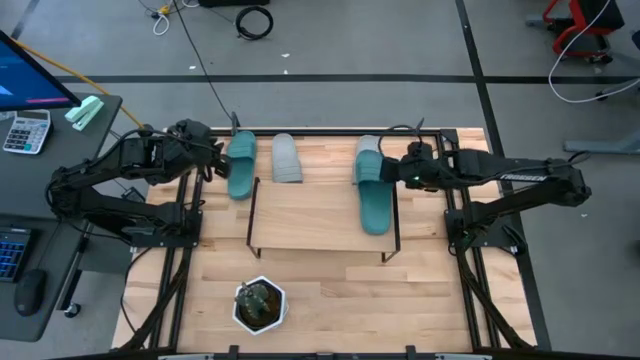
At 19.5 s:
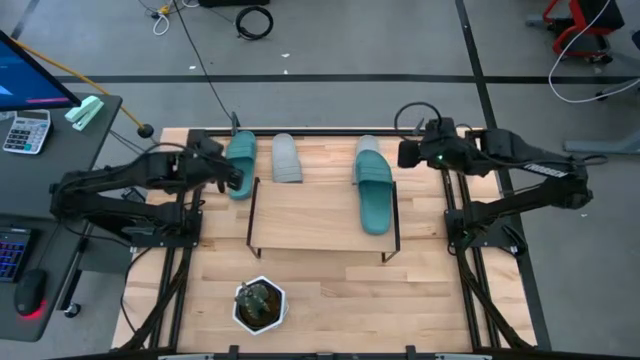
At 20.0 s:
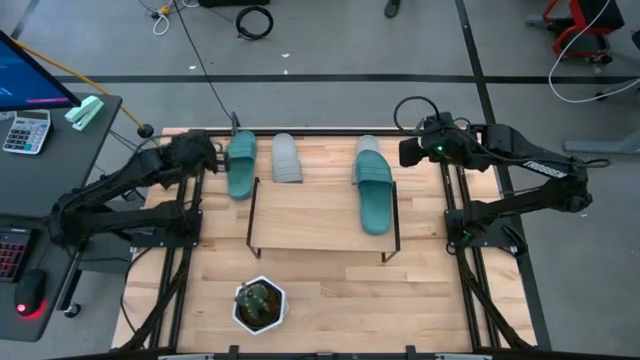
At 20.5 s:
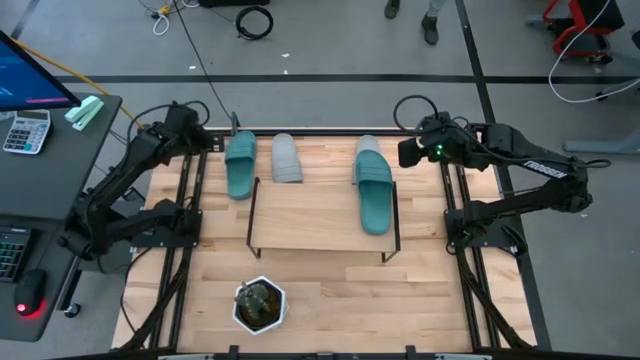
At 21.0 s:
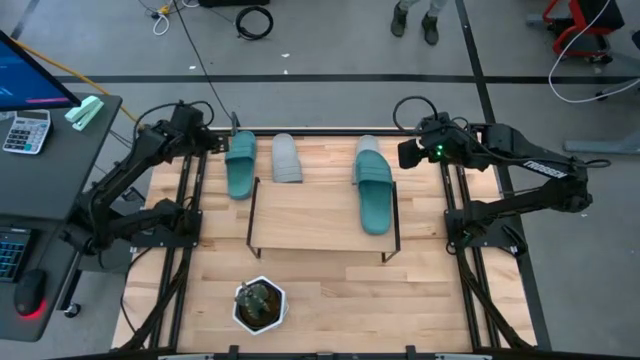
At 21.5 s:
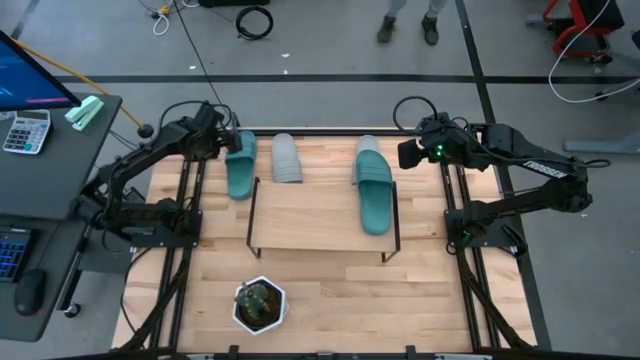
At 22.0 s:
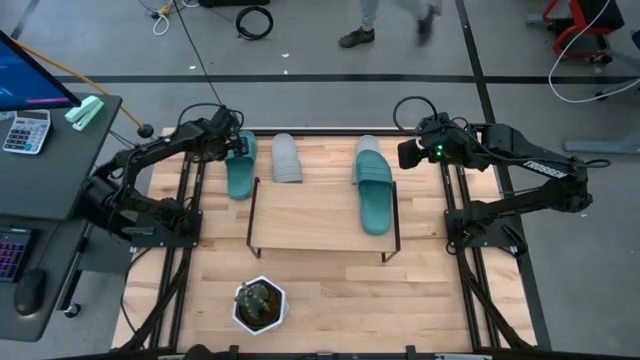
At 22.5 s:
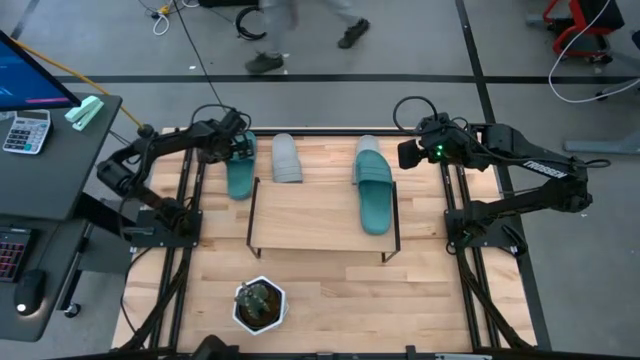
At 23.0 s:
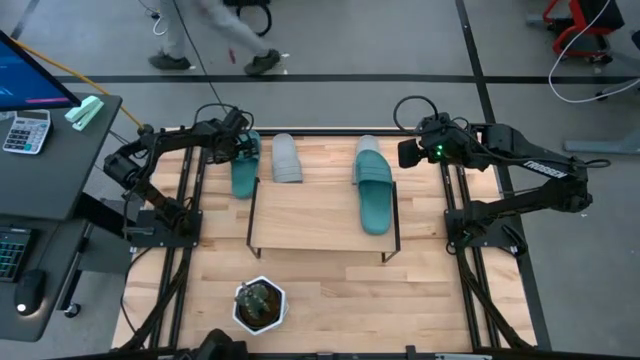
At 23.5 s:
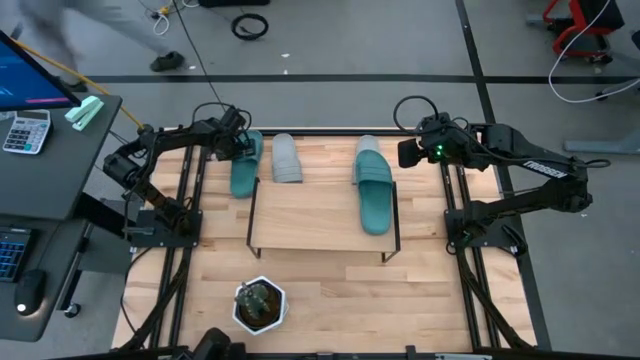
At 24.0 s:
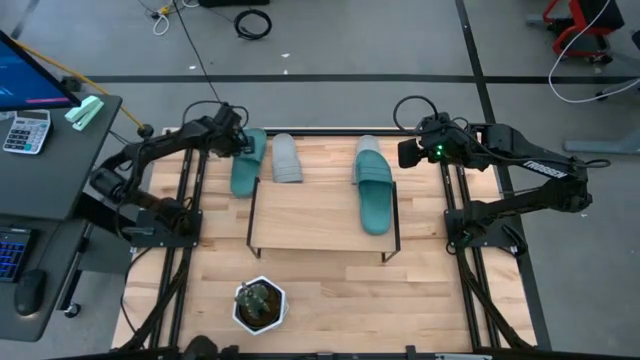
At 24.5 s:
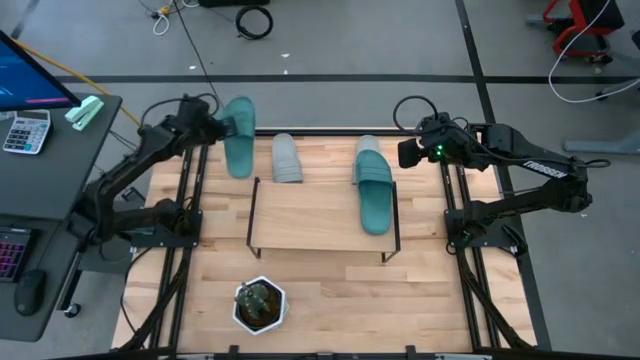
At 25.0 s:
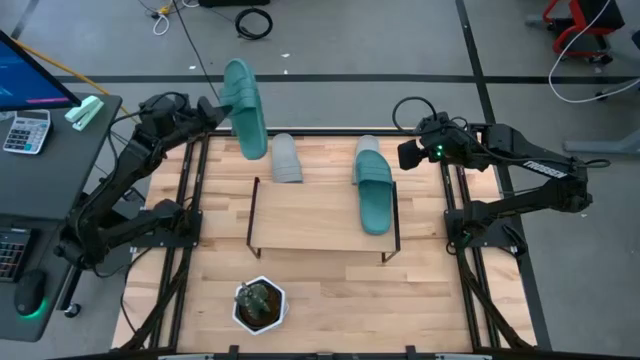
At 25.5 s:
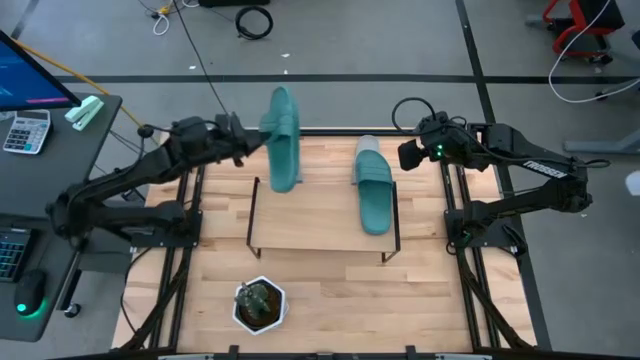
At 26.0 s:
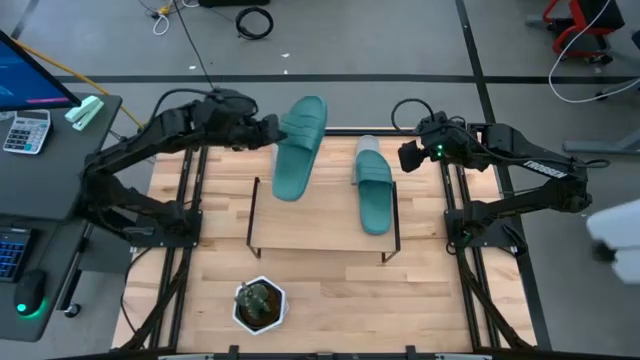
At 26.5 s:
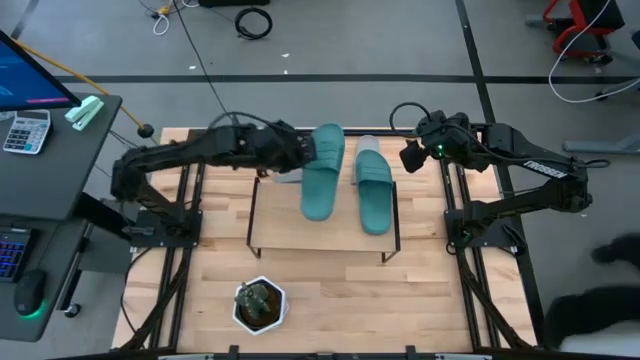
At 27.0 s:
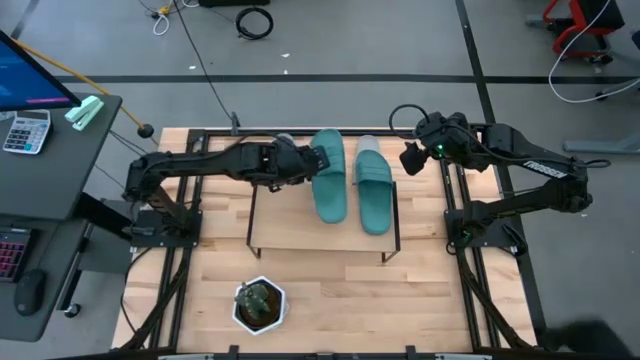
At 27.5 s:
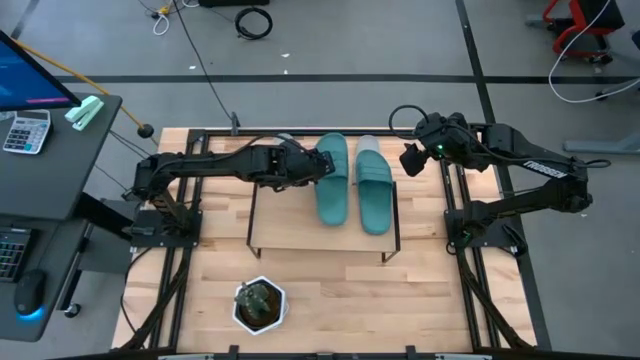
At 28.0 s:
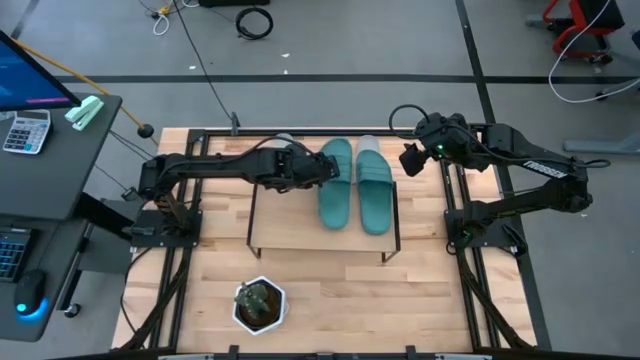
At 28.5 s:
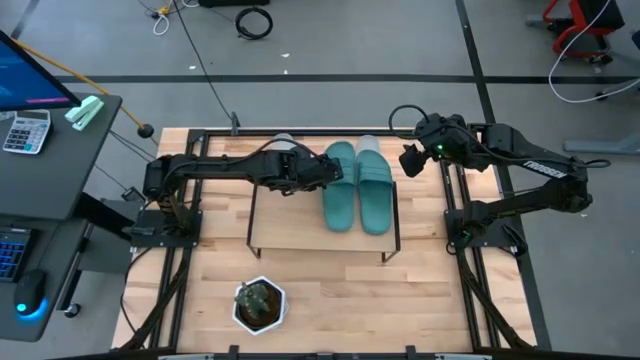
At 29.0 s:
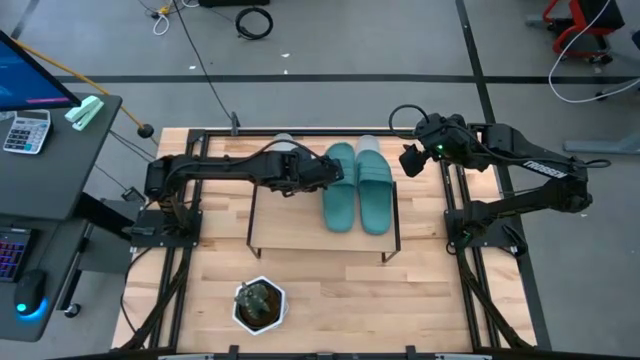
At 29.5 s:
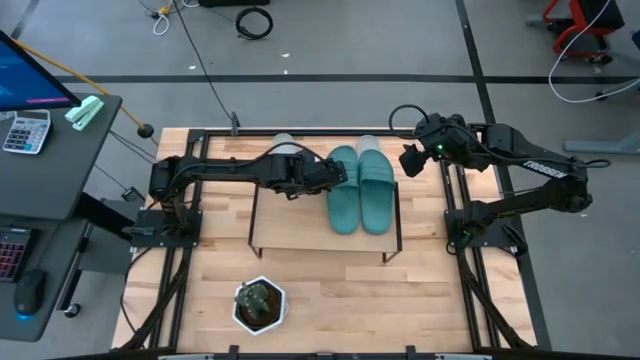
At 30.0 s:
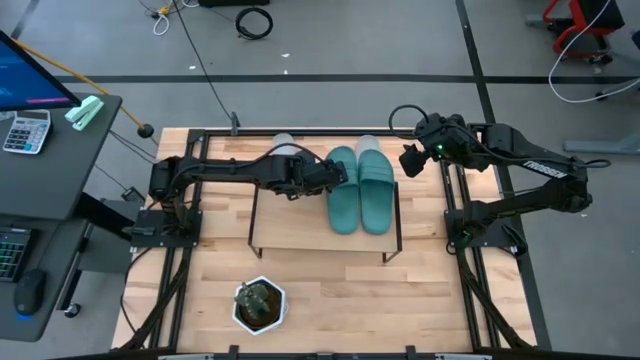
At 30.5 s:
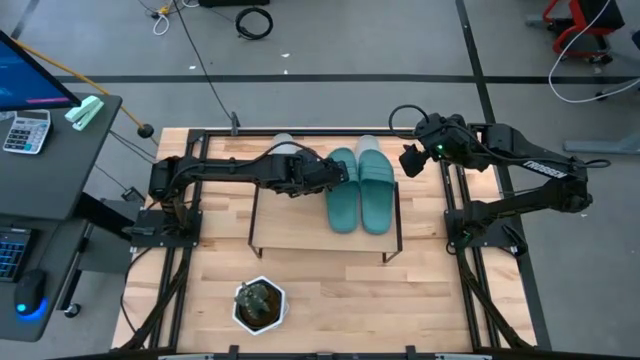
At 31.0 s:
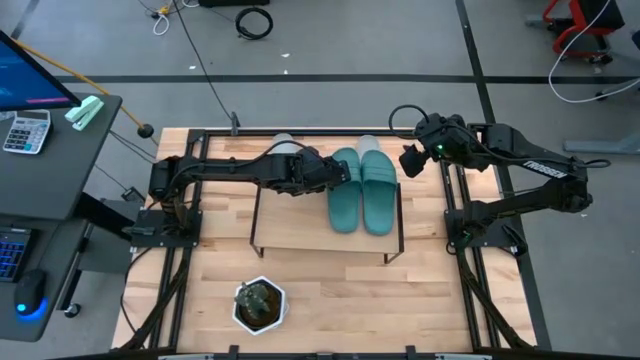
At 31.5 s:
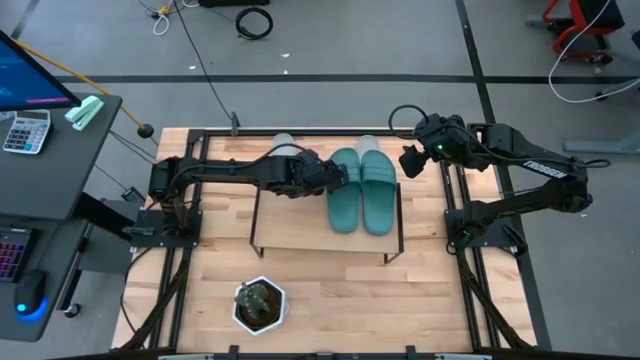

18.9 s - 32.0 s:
Task: Pick and place slides into the shelf
Put the green slide on the shelf

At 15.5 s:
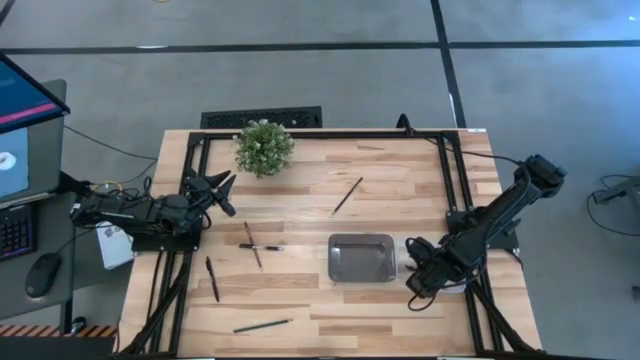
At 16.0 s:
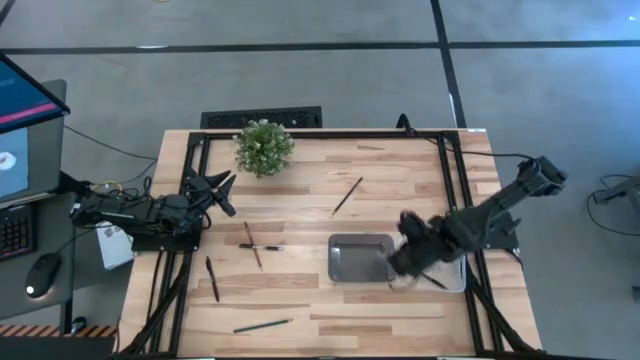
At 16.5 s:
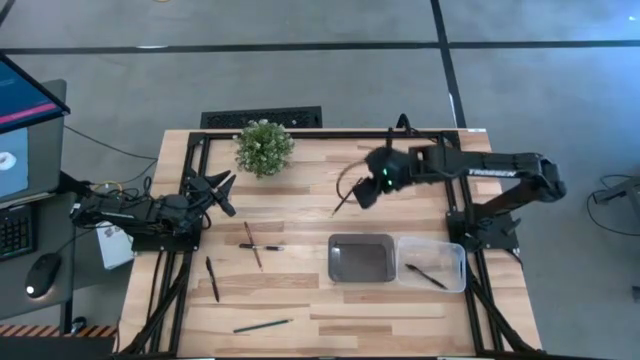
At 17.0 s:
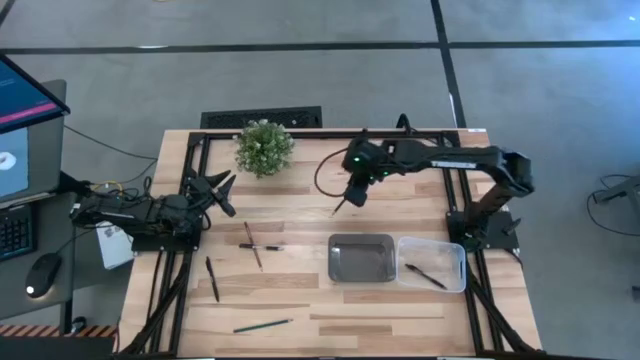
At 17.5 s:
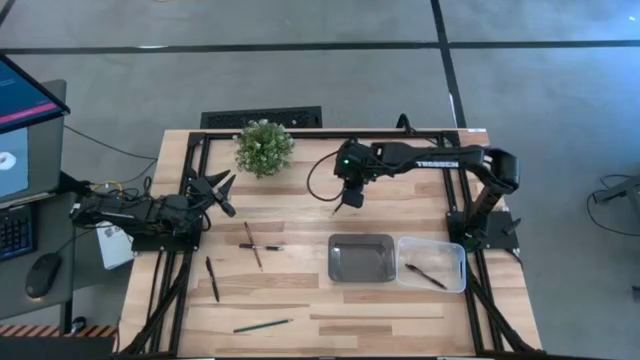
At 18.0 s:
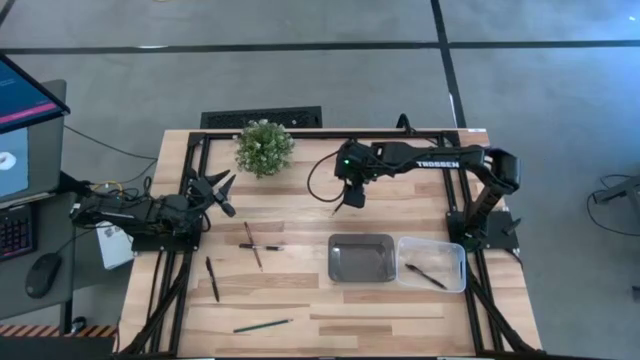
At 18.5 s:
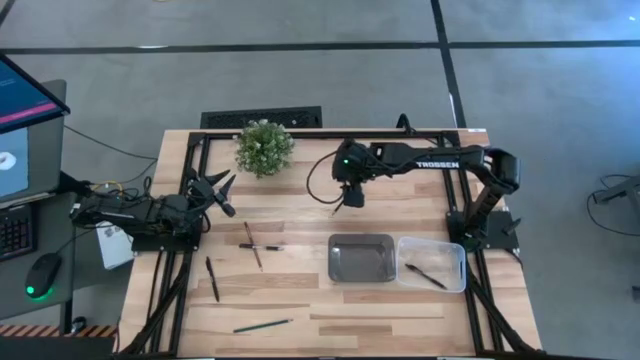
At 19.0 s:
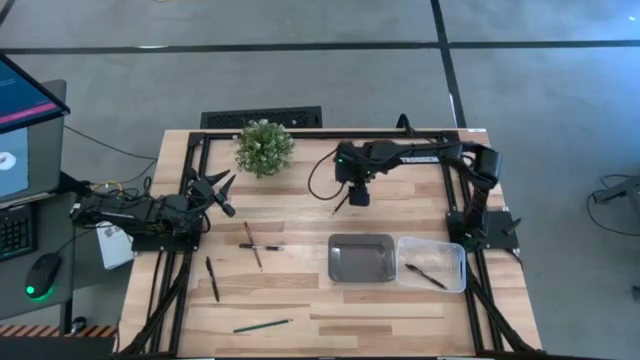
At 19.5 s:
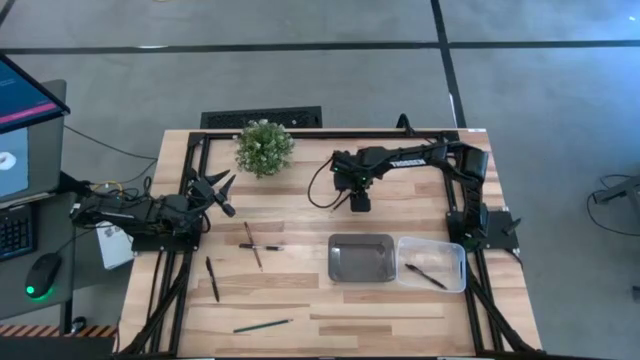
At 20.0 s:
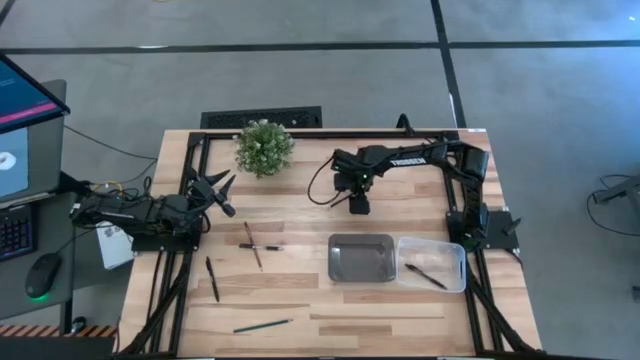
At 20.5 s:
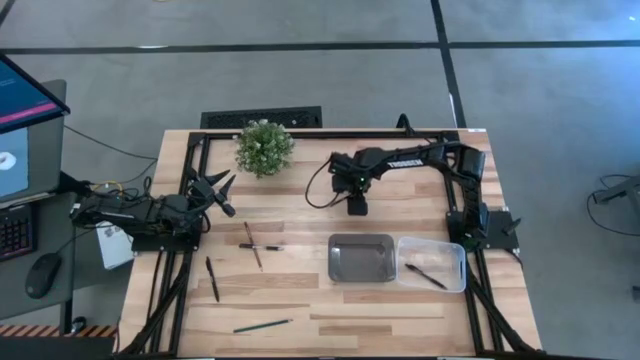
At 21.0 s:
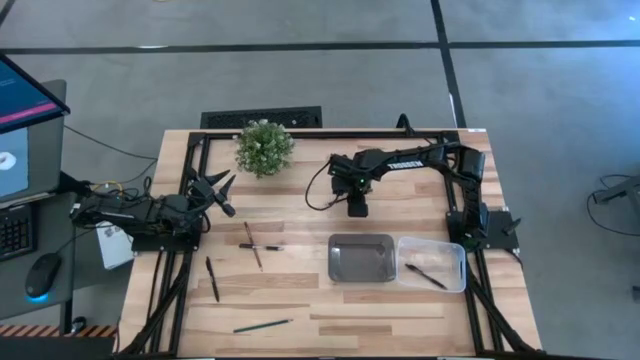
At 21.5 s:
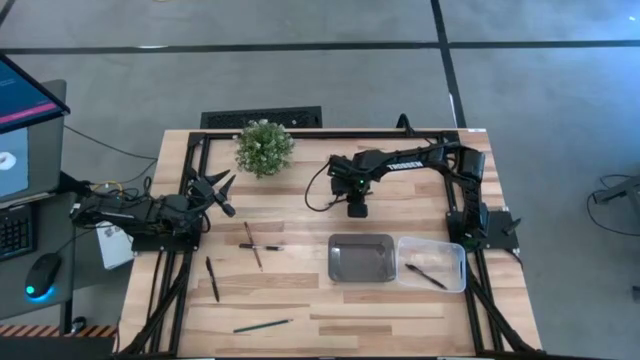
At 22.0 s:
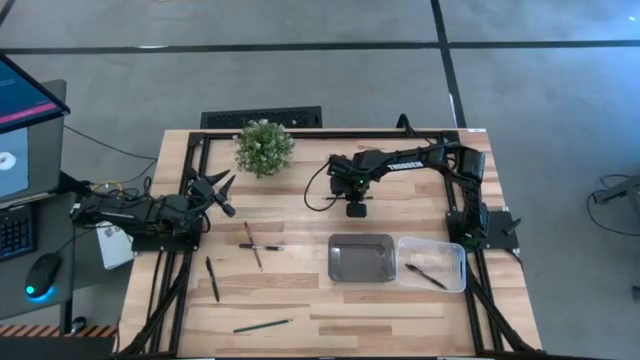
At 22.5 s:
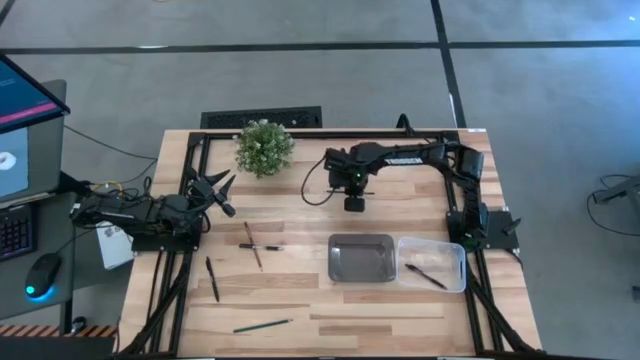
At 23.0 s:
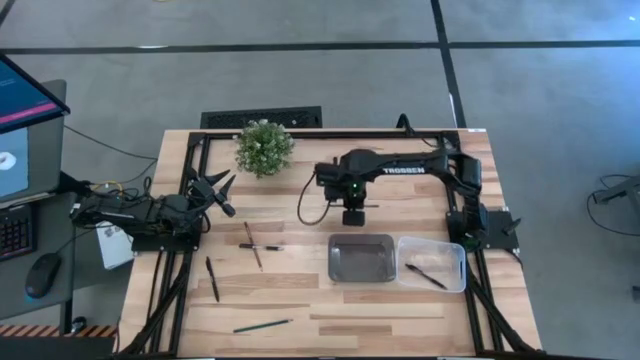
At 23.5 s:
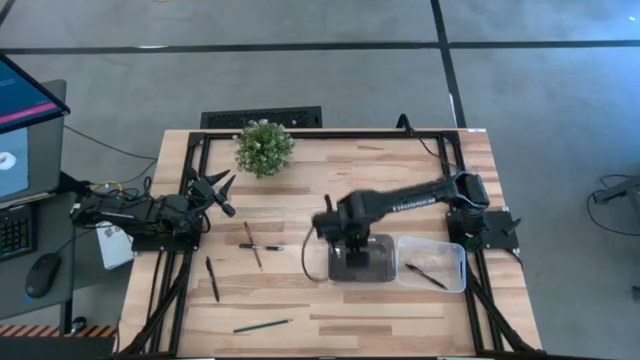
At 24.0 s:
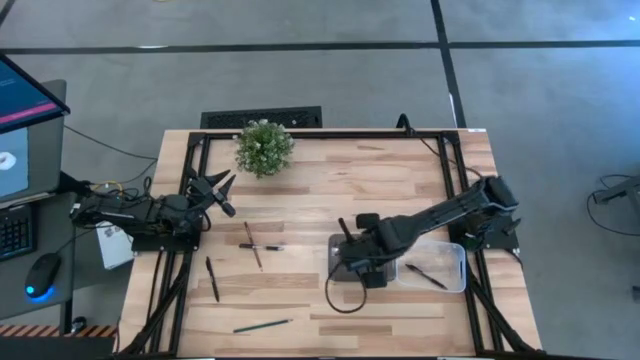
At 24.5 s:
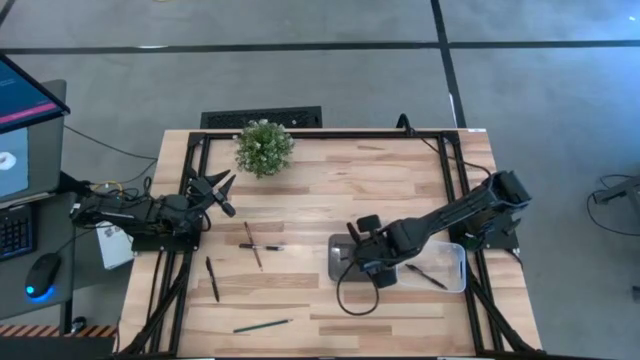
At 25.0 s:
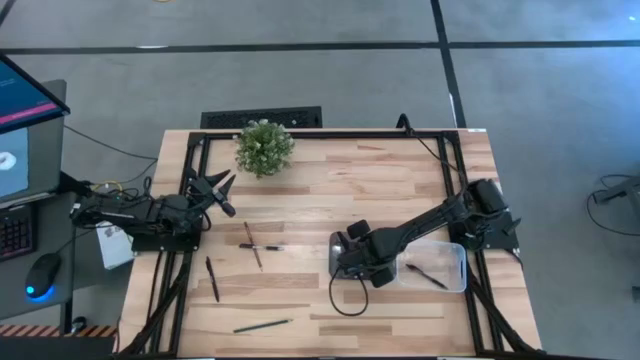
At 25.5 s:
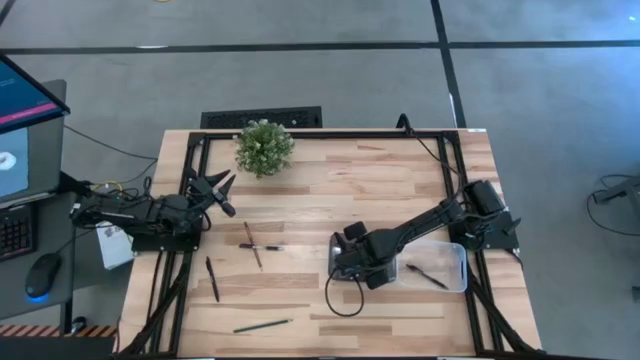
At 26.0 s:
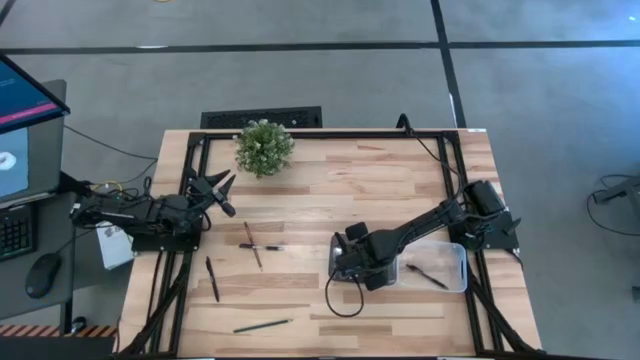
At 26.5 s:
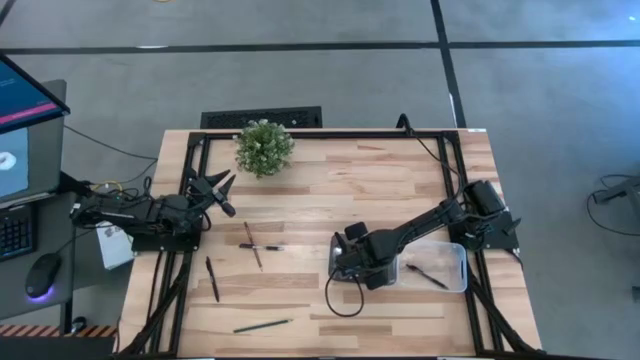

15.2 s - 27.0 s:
Task: Sort pens & pencils
Put the black pencil into the black bin
